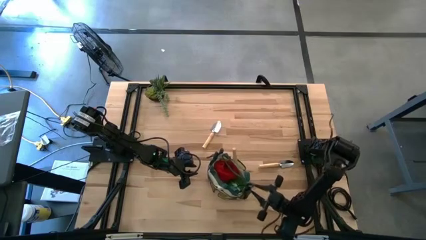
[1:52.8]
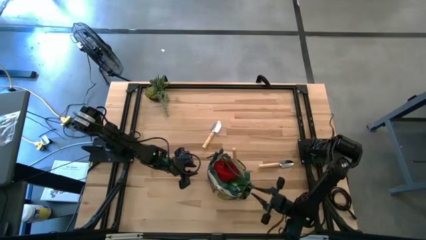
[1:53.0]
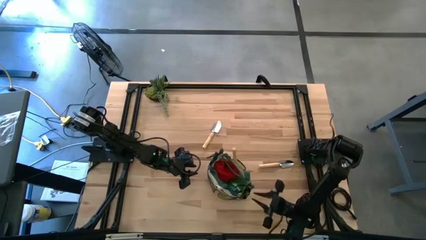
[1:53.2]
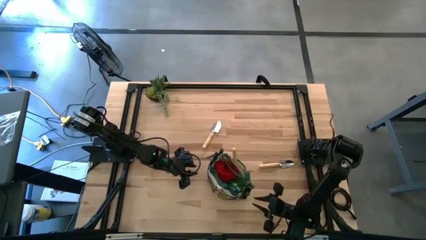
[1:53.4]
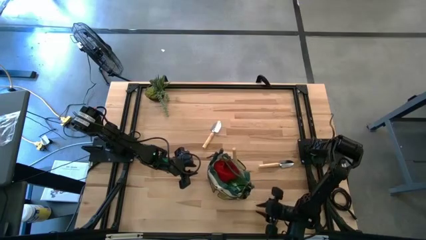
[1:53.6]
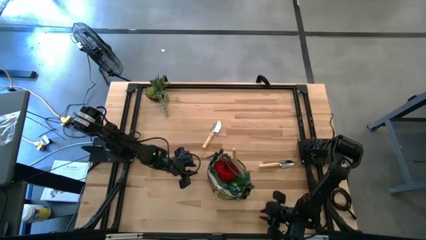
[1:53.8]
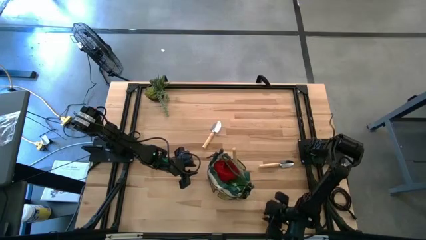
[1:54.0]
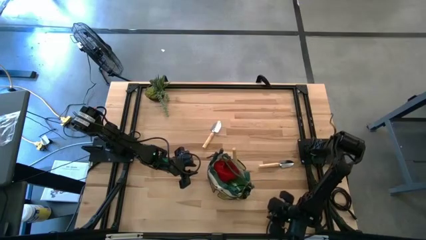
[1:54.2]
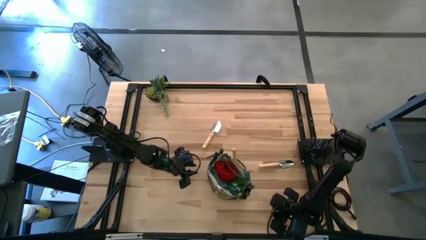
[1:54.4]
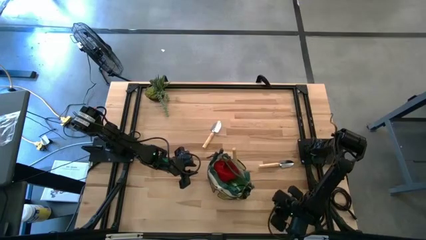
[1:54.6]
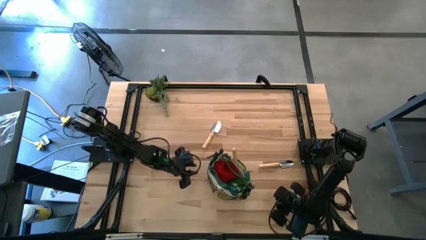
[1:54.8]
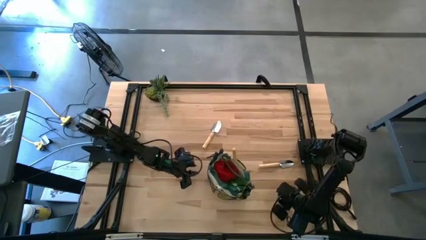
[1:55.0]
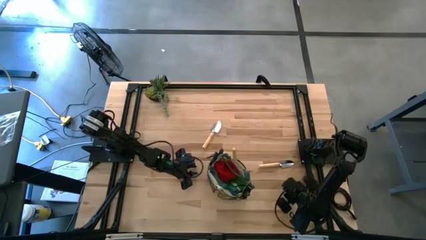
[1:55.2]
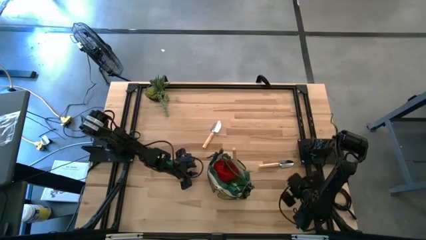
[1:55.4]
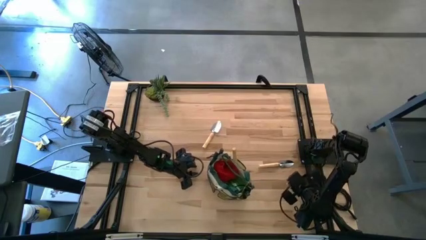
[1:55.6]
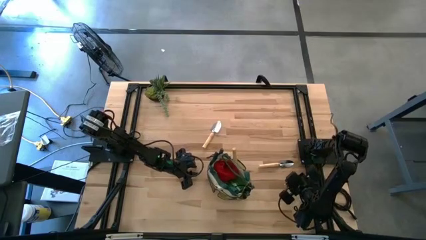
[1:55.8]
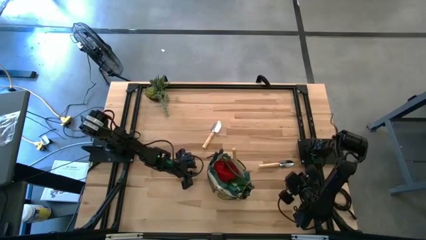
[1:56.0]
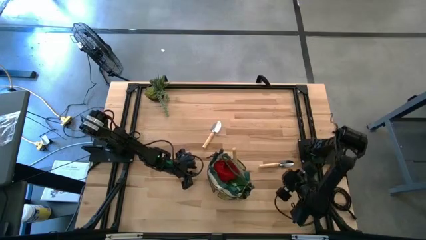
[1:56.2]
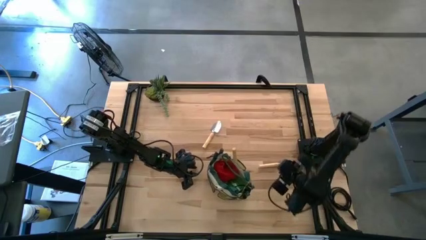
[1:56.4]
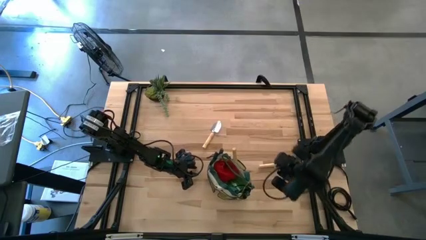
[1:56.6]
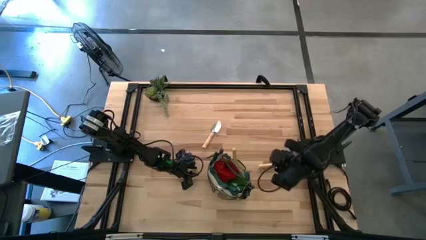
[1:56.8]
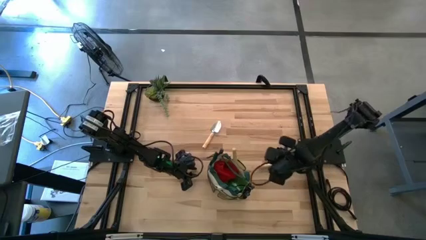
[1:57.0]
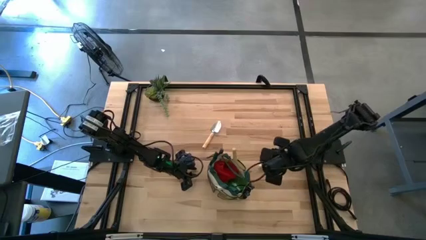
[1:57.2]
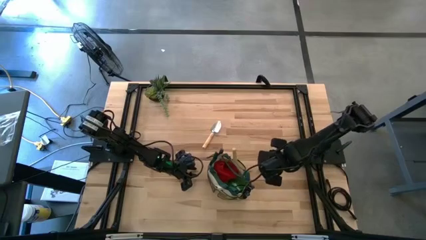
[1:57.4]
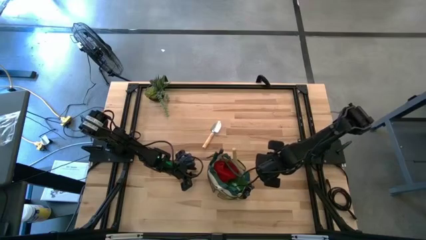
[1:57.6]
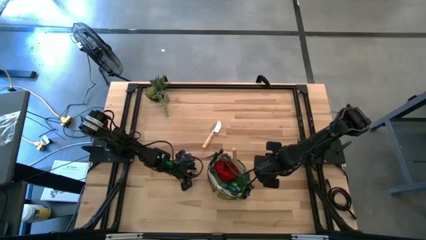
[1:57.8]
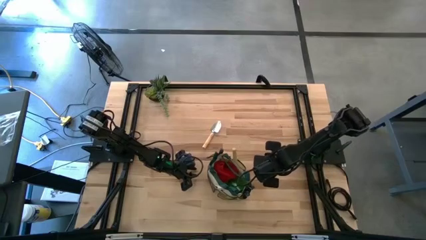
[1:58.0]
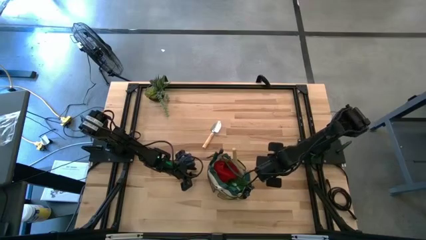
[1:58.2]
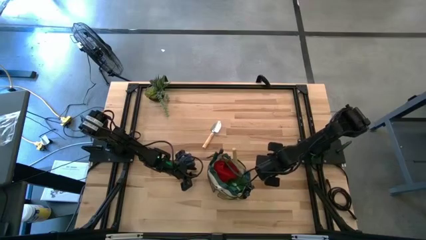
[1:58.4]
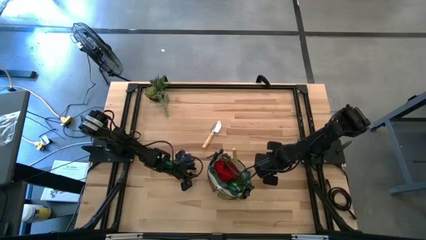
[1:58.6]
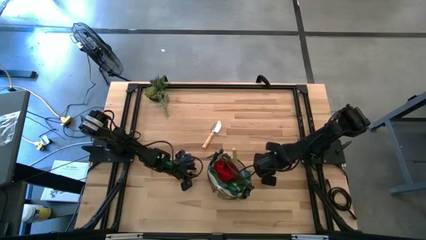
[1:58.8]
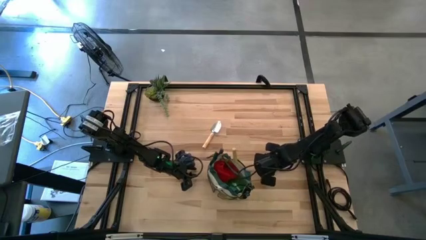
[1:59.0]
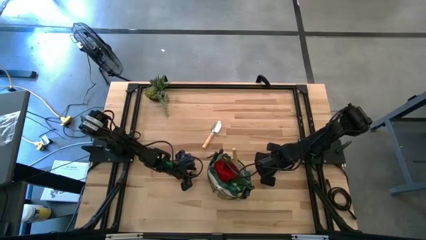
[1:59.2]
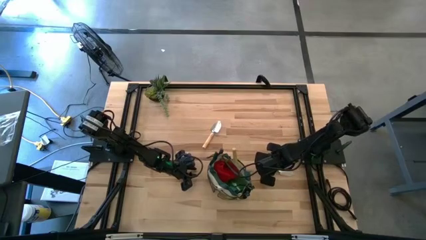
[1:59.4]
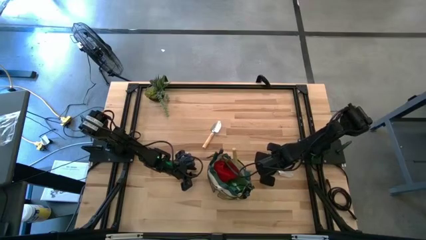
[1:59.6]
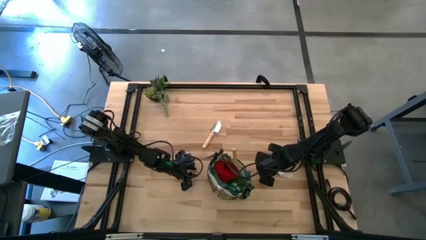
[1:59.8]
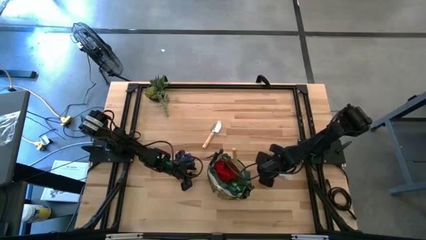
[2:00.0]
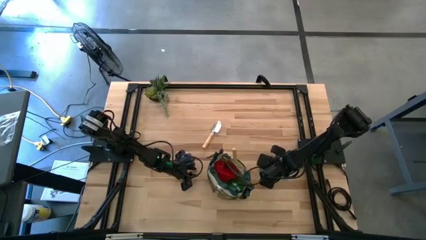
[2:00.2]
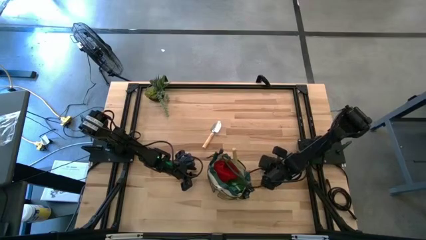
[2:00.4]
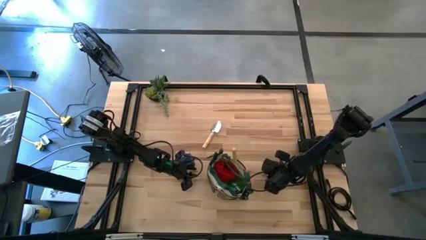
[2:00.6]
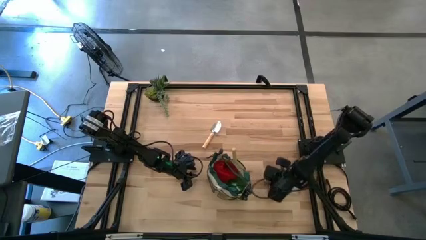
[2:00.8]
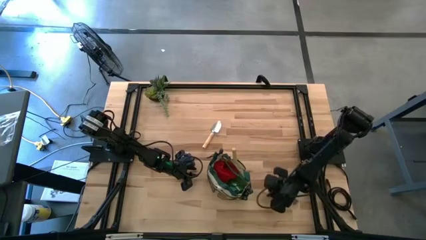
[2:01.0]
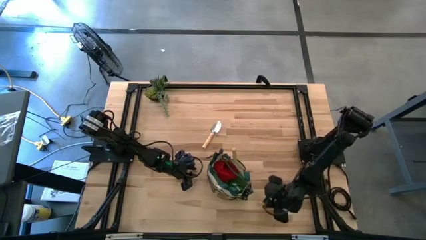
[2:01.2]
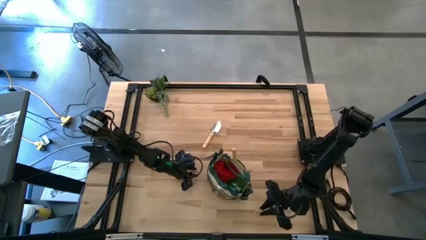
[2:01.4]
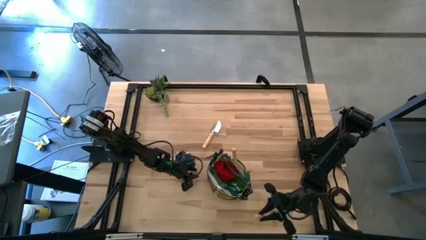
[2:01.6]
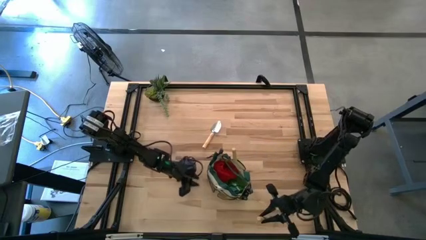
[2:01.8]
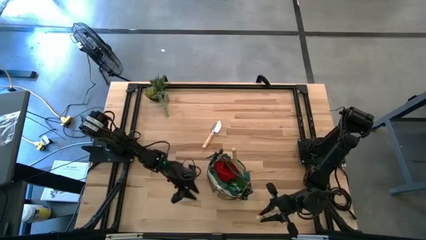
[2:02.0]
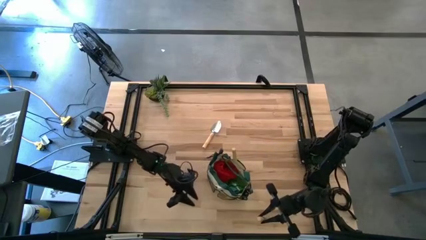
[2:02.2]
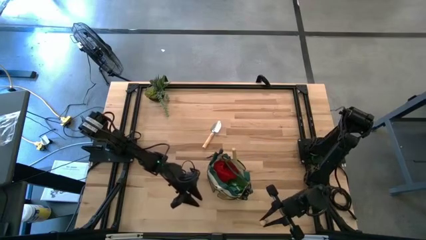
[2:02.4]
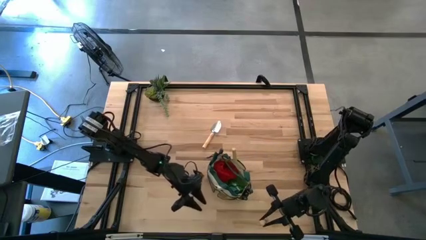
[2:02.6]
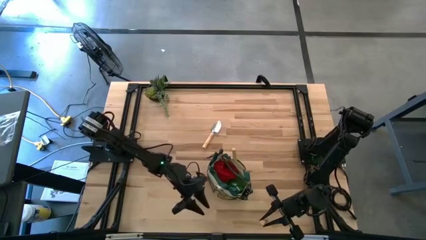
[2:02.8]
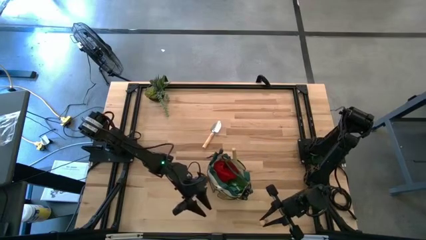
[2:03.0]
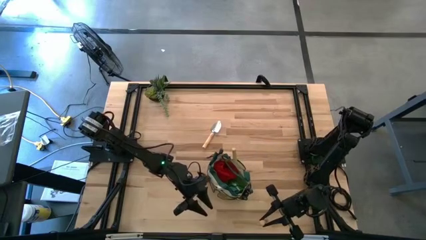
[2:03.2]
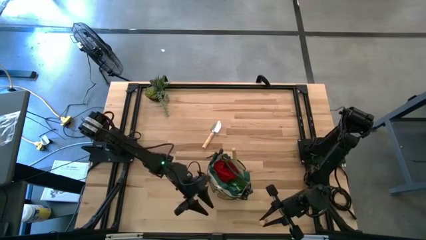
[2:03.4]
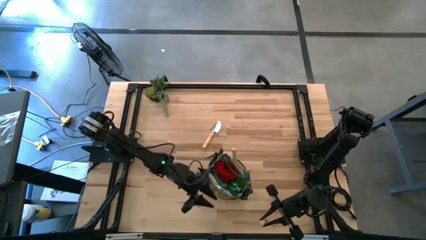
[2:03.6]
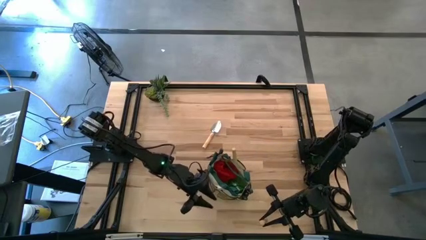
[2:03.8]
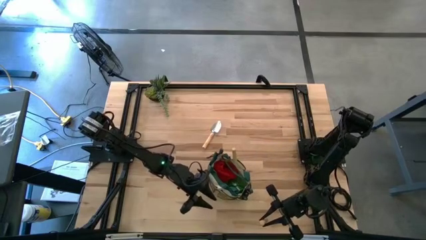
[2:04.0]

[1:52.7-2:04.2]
Task: Pick & Place Garden tools in Gardening bag
Put the right trowel into the light brown gardening bag

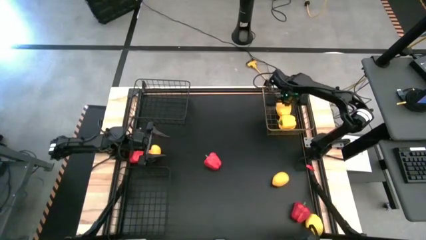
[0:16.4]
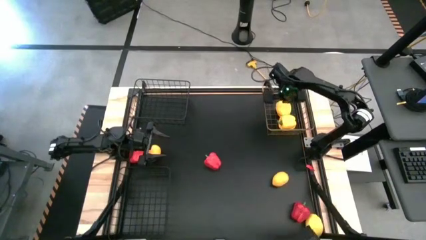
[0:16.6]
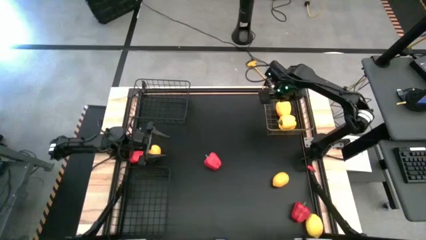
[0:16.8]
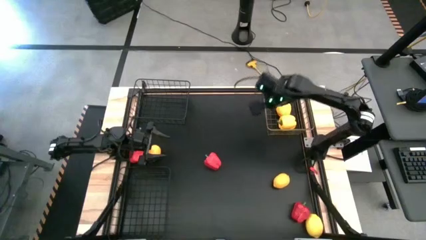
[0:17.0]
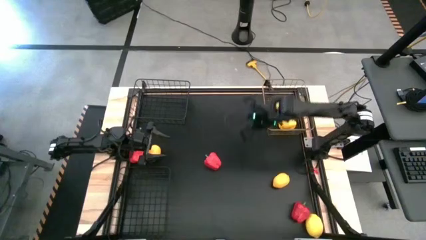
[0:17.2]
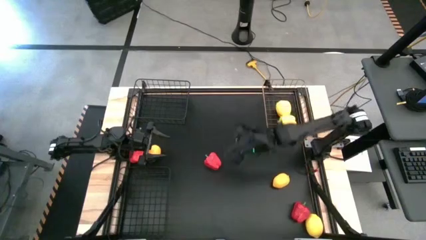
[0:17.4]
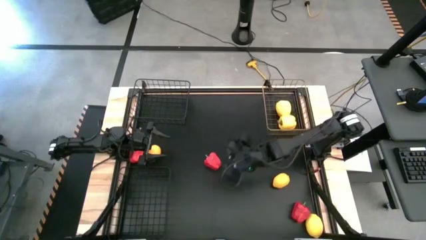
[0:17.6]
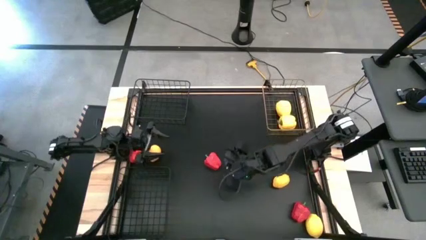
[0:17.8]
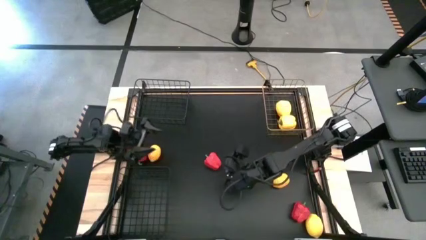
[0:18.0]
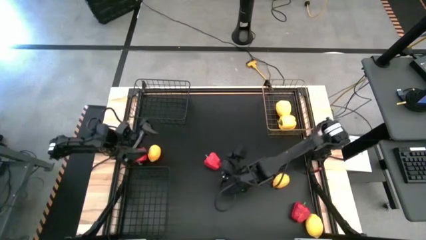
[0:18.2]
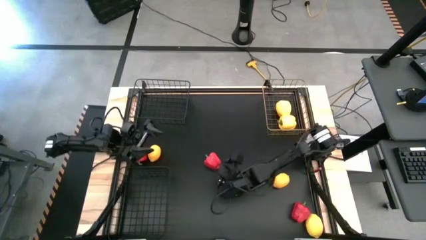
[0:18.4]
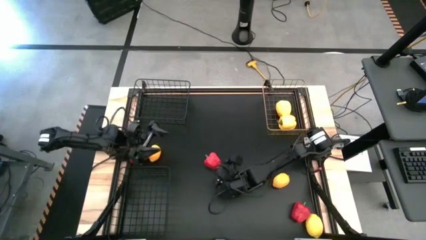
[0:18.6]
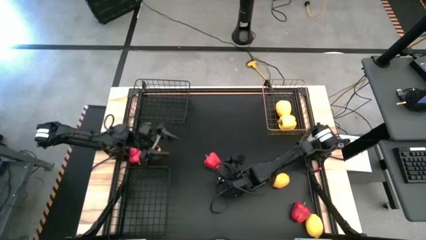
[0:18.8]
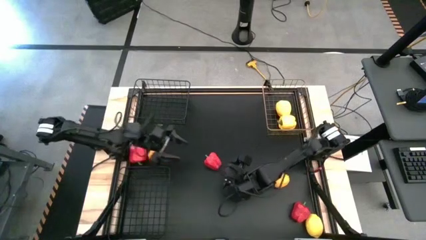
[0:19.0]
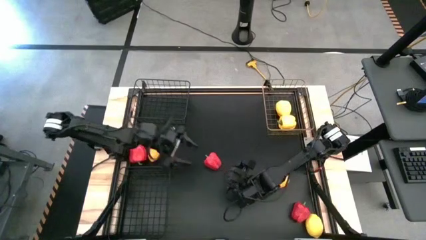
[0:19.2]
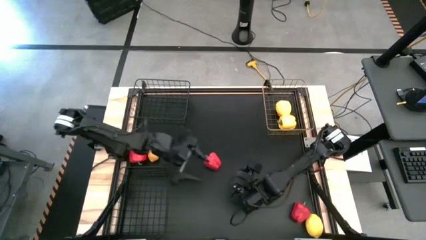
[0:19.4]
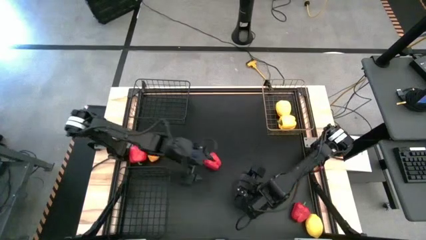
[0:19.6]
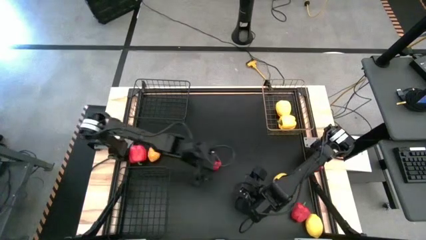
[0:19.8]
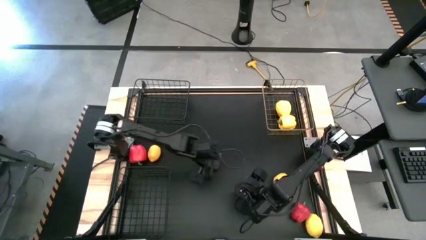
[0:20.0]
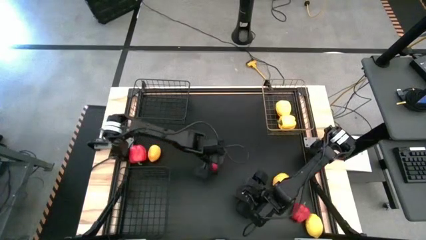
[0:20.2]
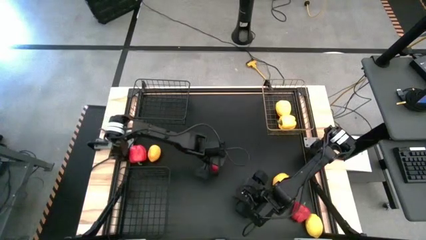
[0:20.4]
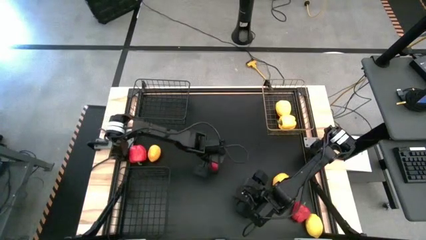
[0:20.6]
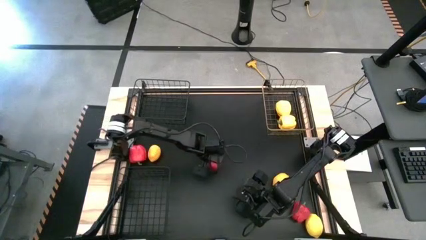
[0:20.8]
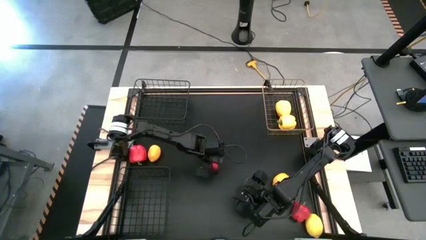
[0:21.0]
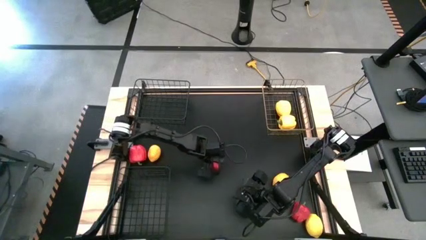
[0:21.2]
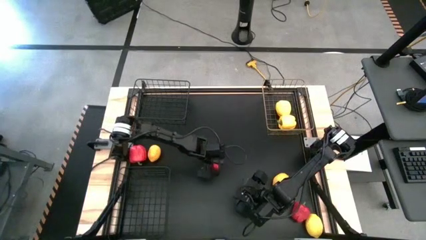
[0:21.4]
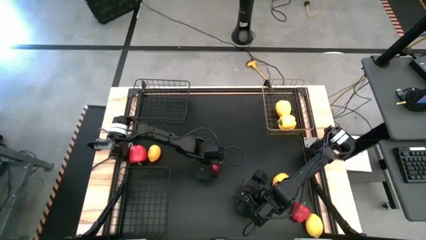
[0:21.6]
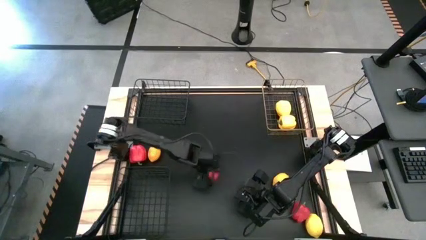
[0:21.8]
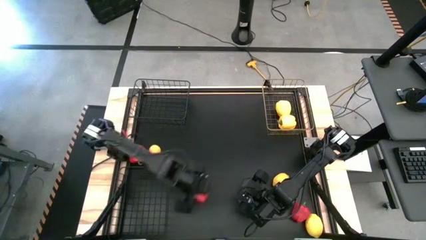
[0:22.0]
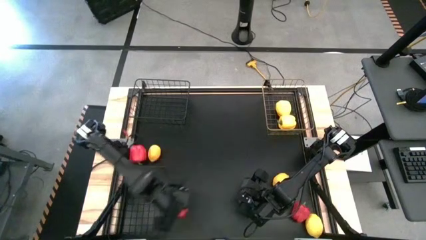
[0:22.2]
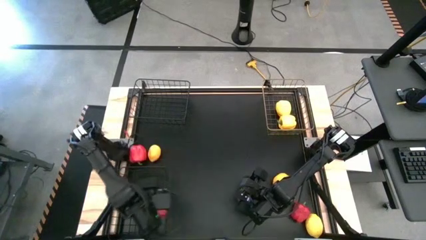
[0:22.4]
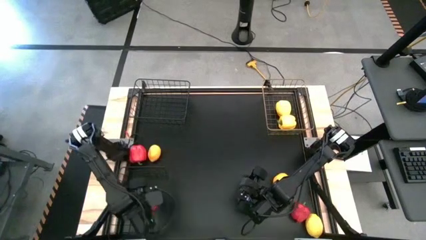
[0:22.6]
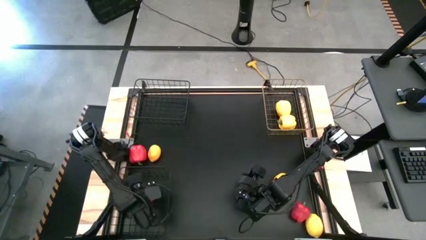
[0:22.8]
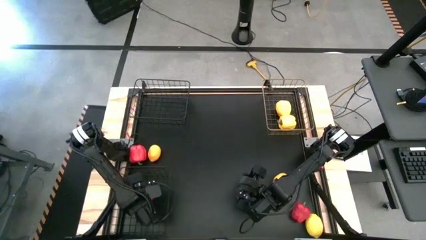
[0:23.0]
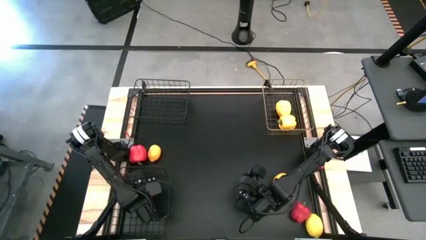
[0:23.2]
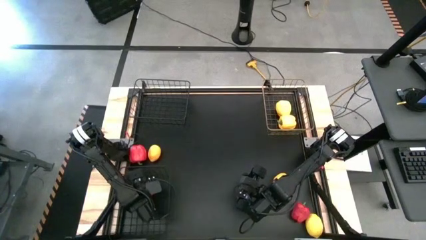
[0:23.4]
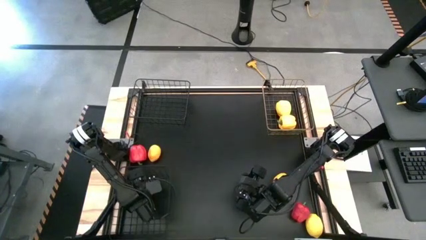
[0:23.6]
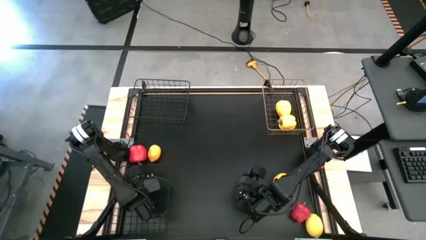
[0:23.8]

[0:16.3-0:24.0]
Task: Sort produce into baskets
Put the middle red bell pepper into the bottom black wire basket
